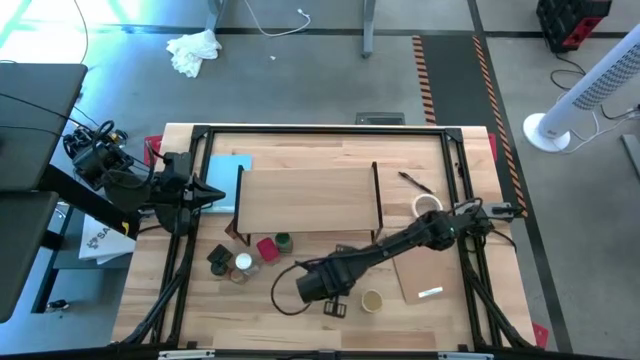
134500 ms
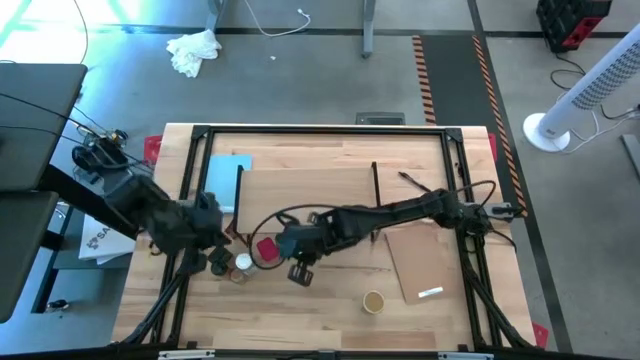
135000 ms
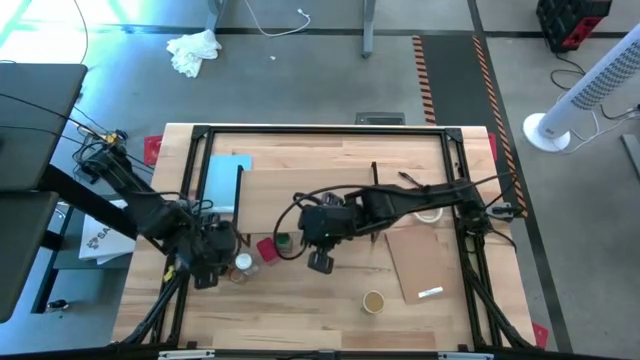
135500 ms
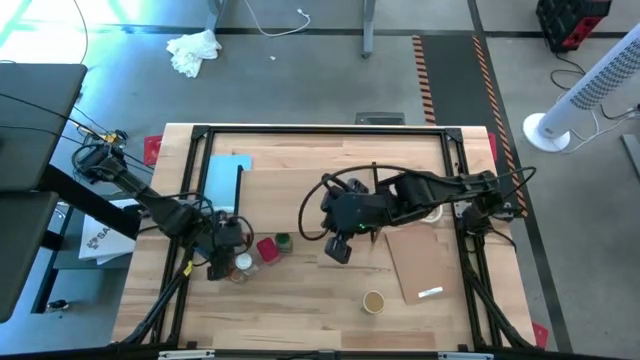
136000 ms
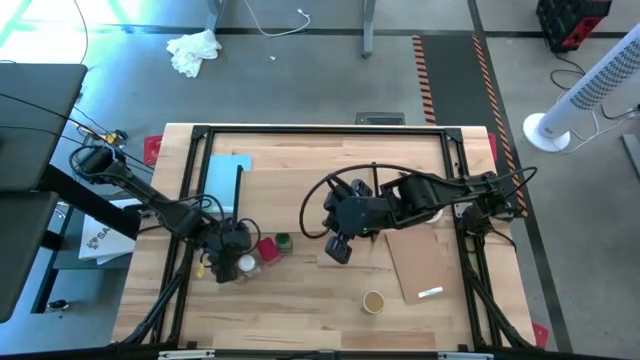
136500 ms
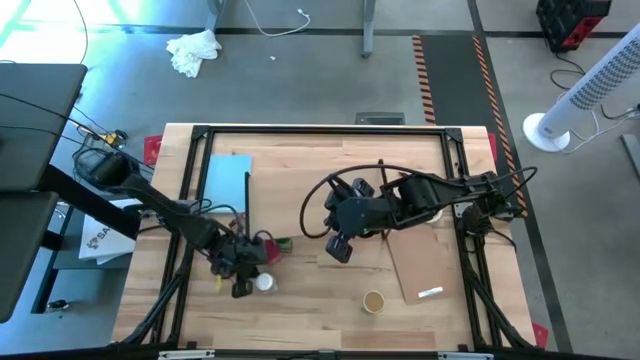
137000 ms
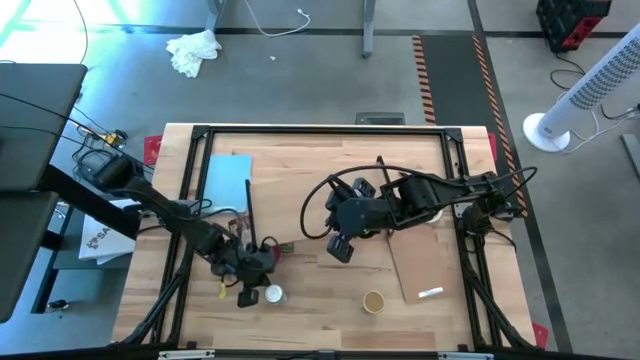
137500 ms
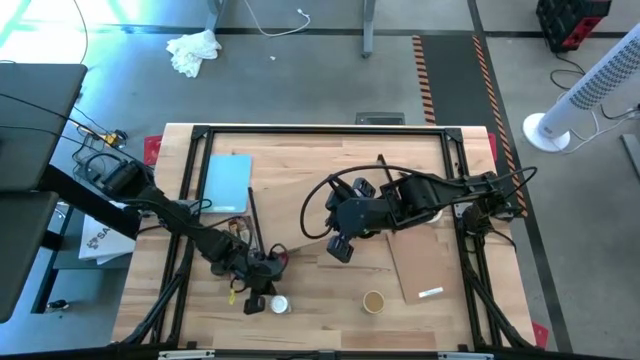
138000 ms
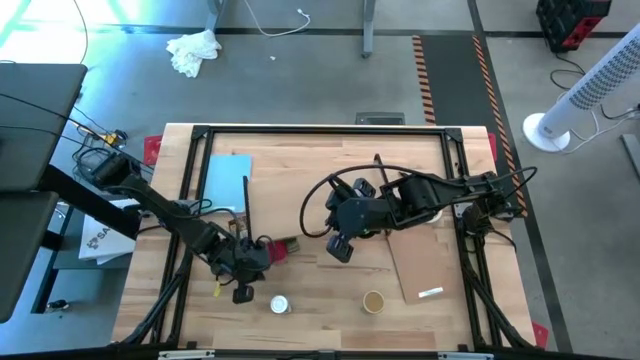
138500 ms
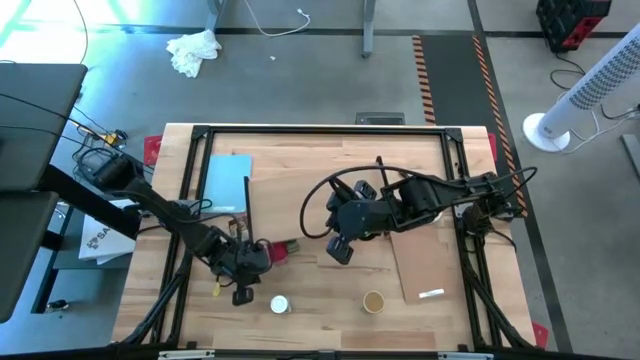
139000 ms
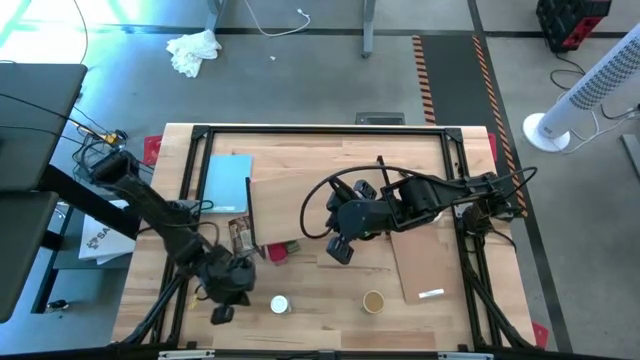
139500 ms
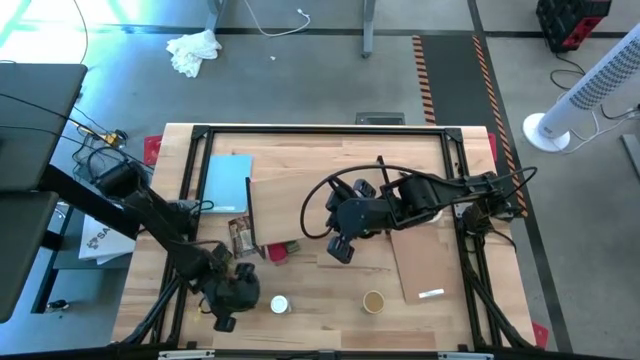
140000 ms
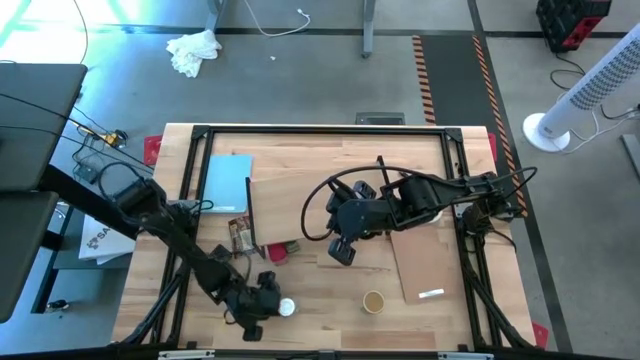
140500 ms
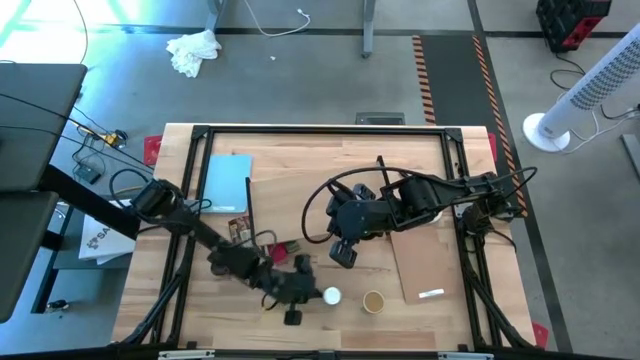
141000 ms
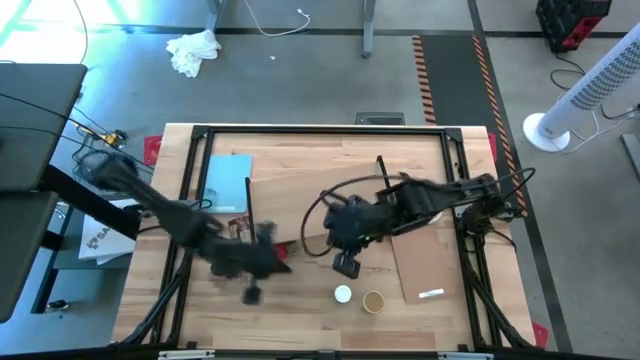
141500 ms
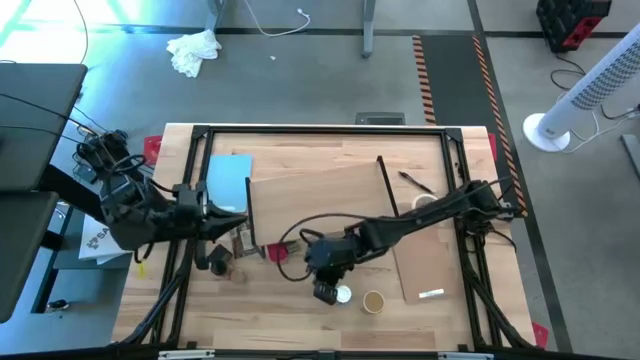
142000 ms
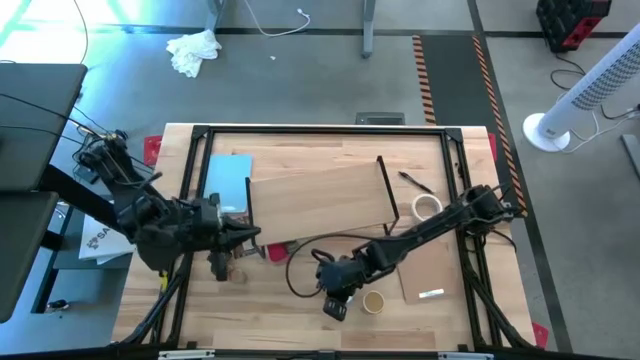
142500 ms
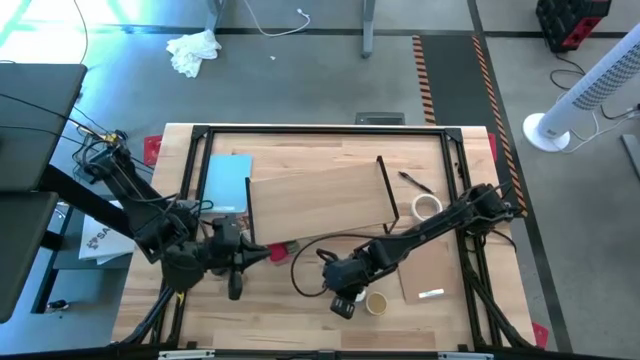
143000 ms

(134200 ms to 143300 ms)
Task: Shelf spices
Move the white seasoning bottle to the bottom right of the table

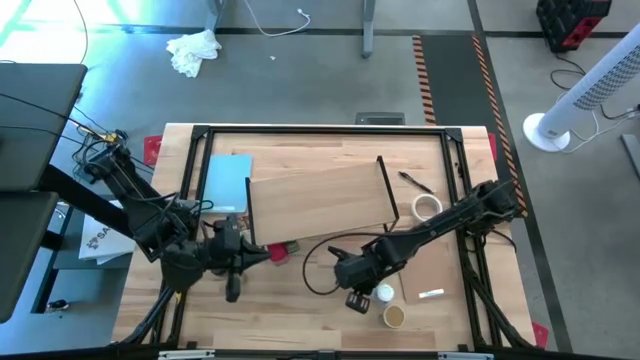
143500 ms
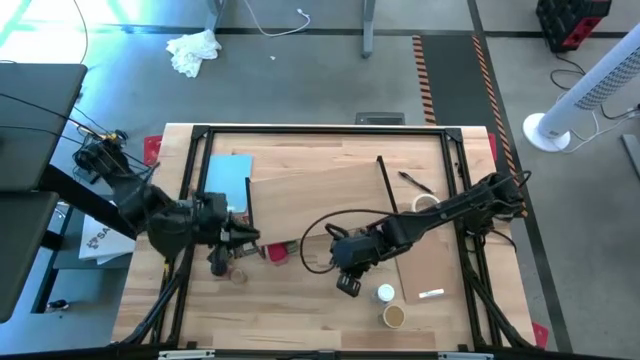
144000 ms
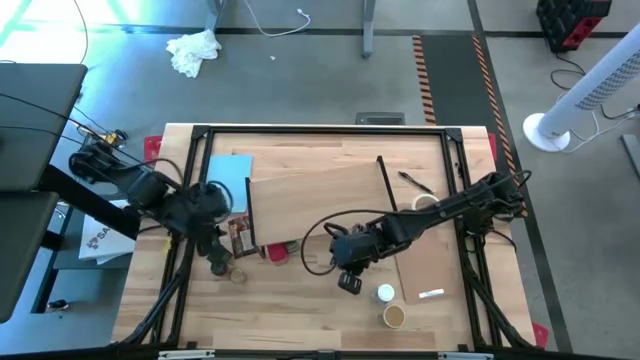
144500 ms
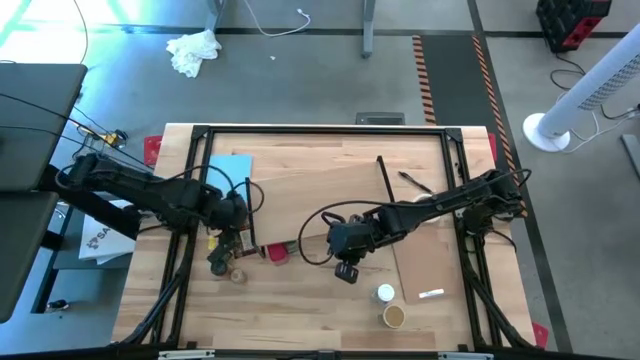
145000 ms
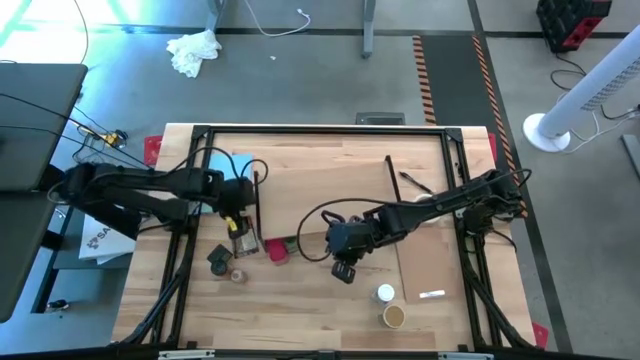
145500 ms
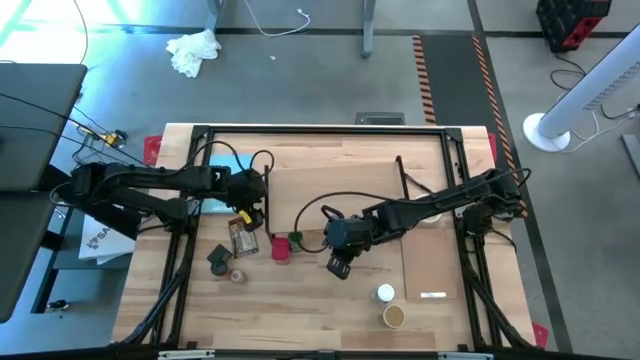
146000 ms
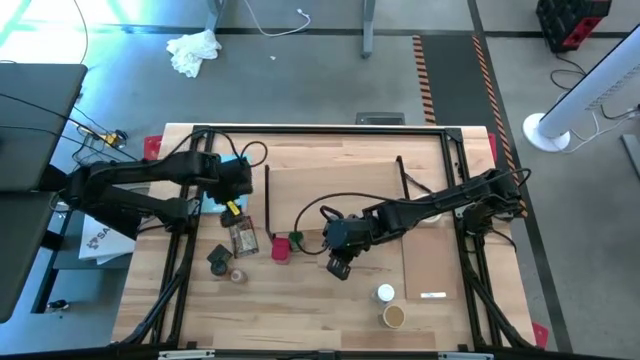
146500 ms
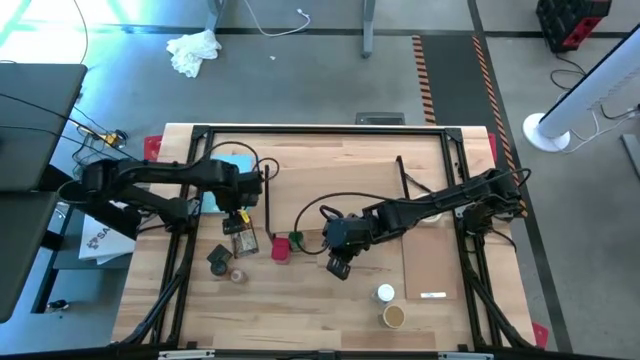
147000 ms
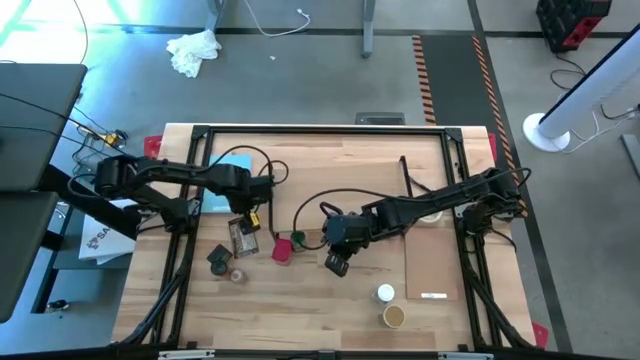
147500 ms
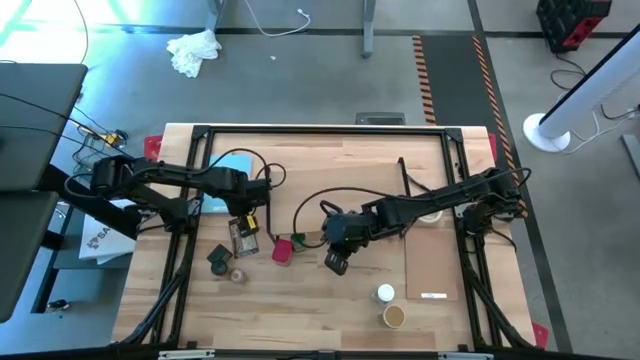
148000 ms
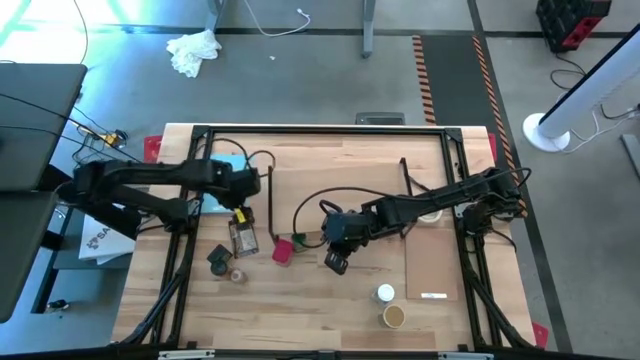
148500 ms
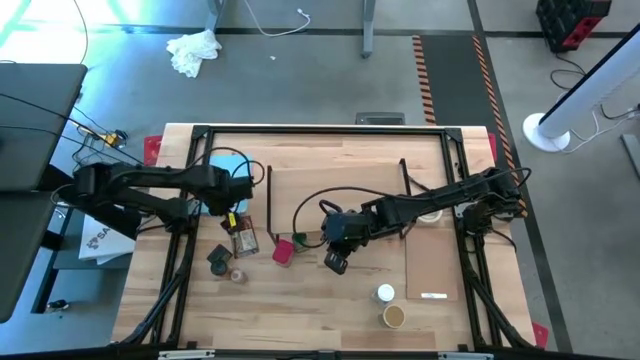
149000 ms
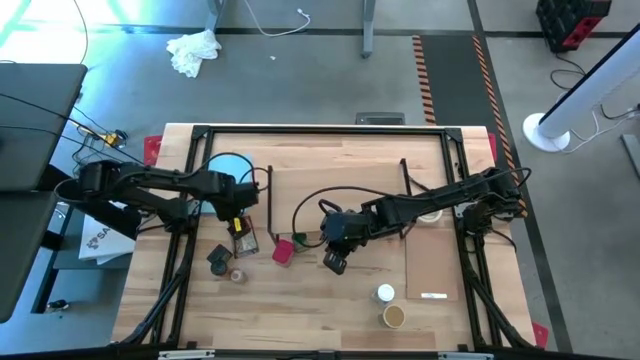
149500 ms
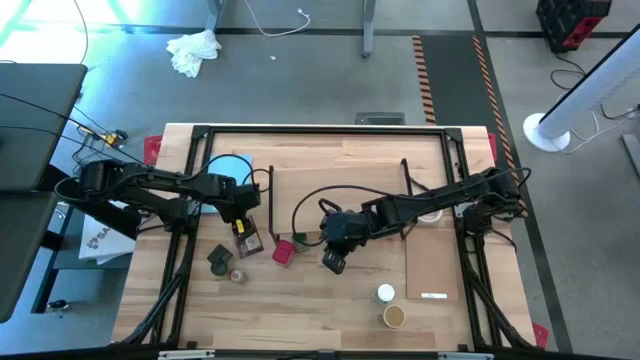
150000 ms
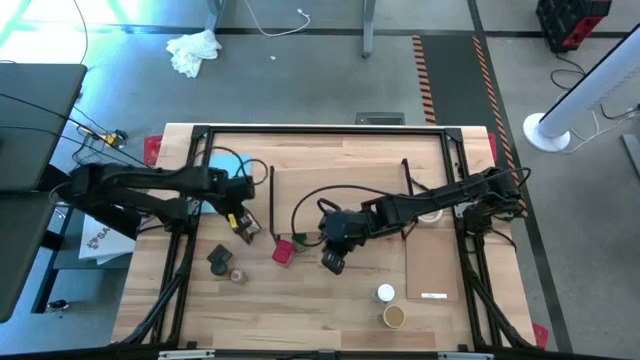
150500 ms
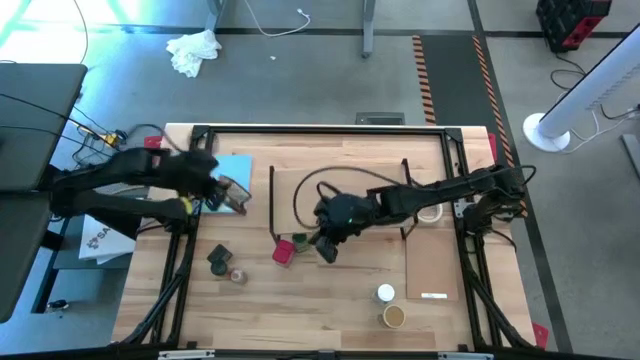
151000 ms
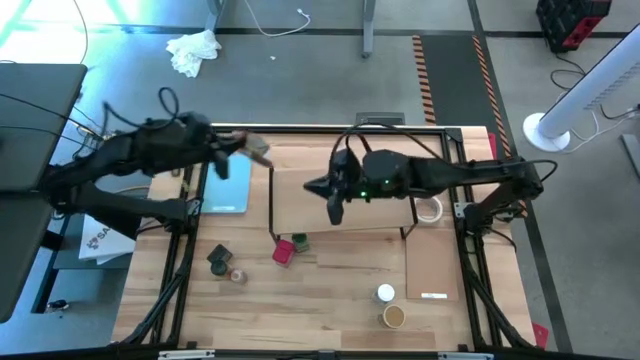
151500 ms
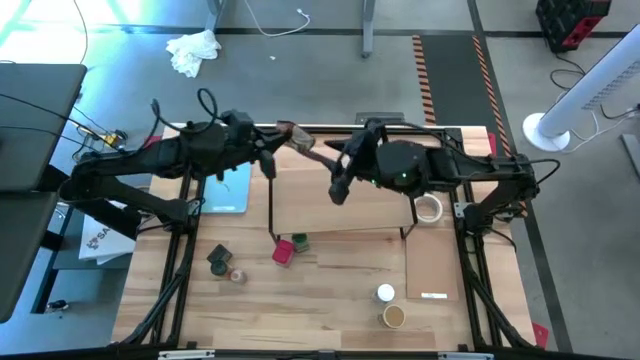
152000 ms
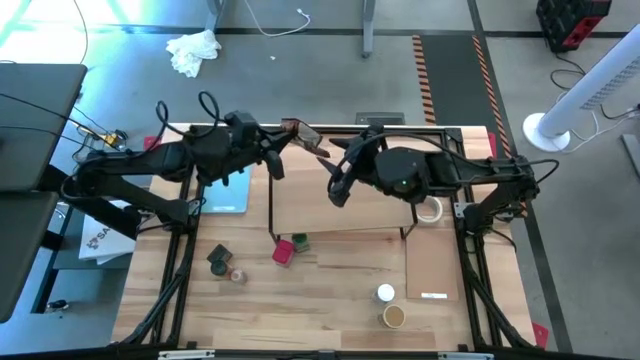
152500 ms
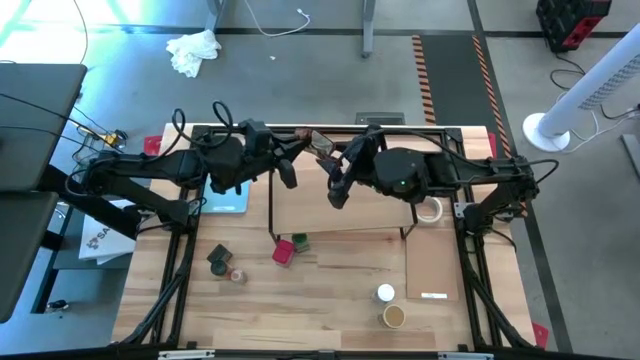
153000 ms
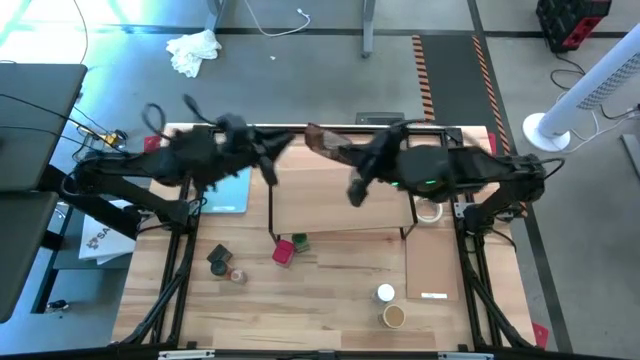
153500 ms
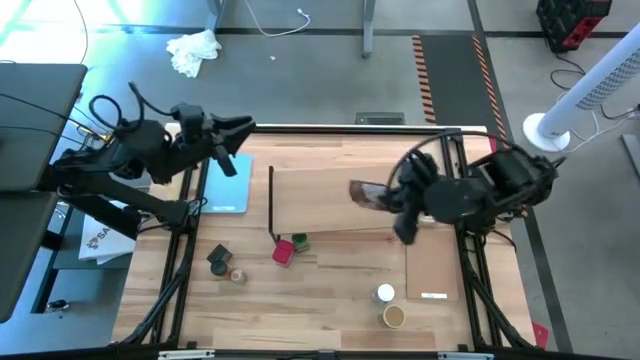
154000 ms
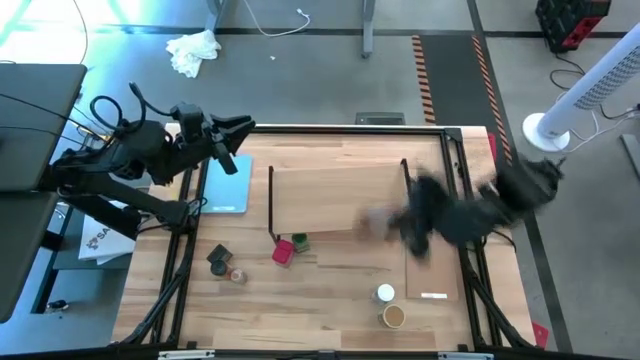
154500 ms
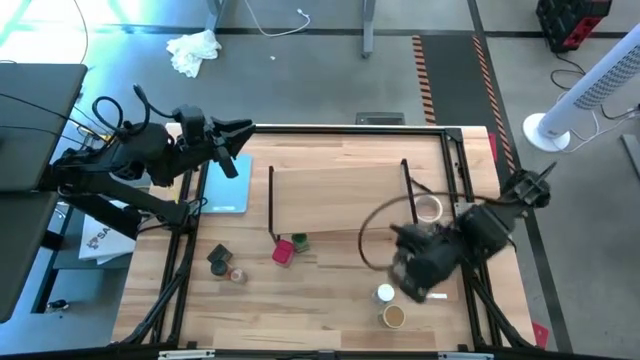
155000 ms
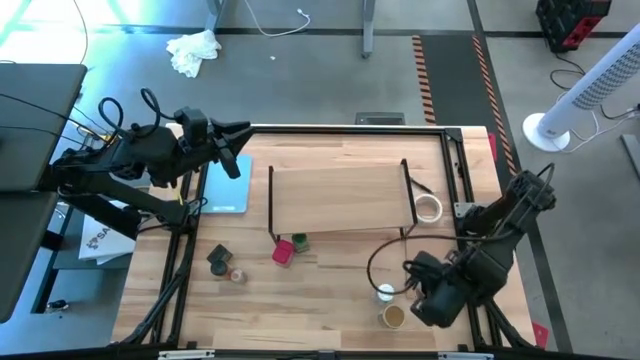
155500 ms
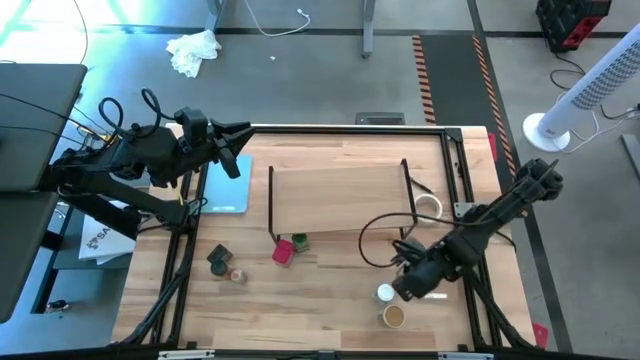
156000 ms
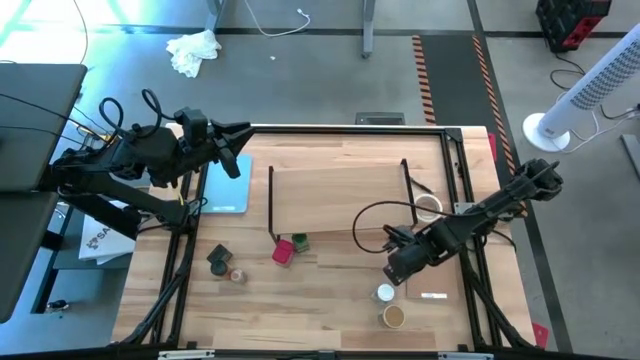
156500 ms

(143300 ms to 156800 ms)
Move the orange seasoning bag to the bottom right of the table
